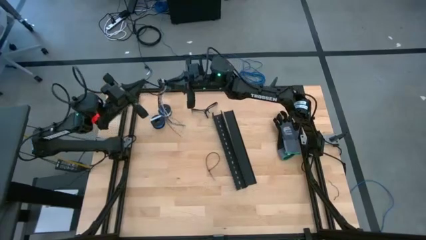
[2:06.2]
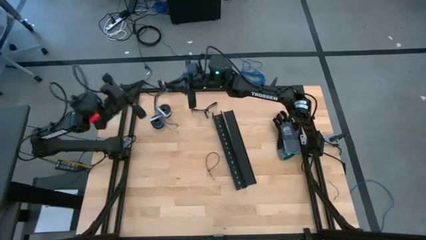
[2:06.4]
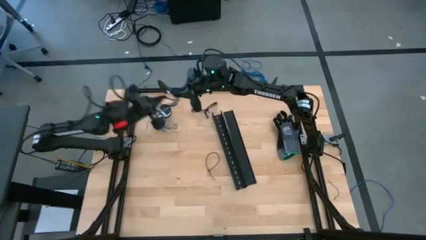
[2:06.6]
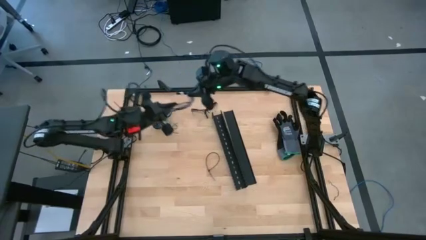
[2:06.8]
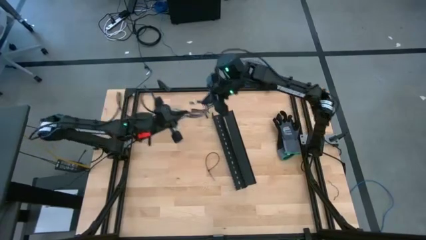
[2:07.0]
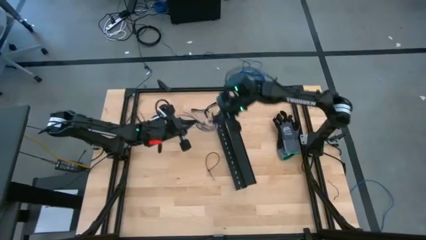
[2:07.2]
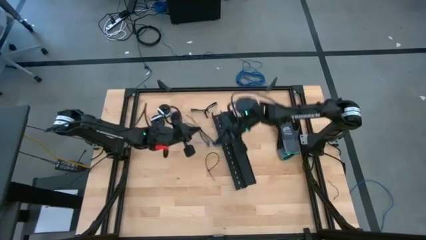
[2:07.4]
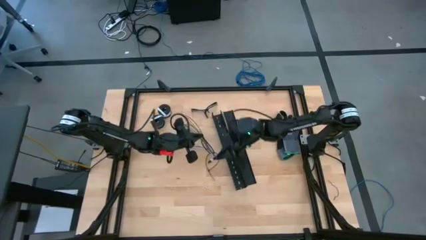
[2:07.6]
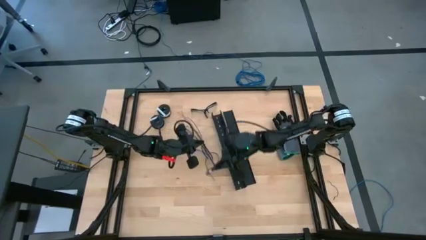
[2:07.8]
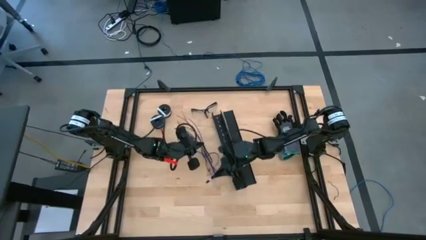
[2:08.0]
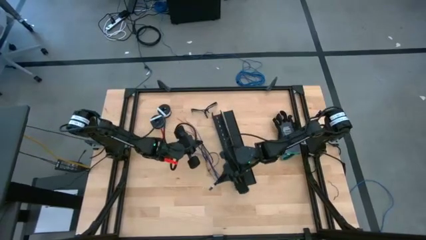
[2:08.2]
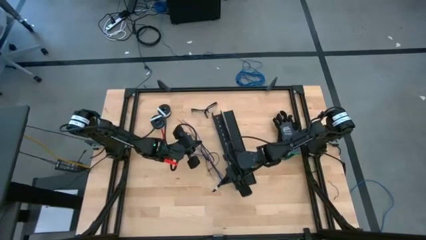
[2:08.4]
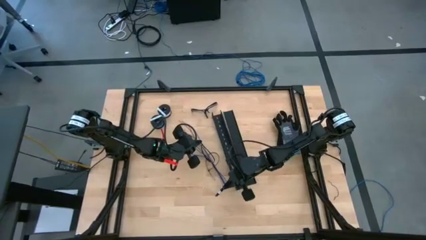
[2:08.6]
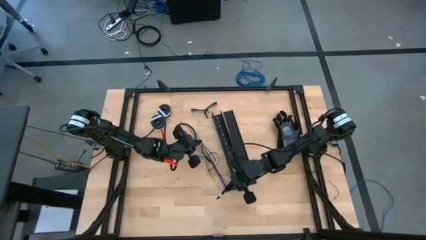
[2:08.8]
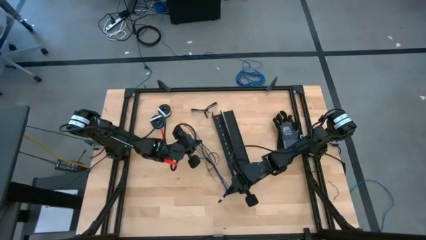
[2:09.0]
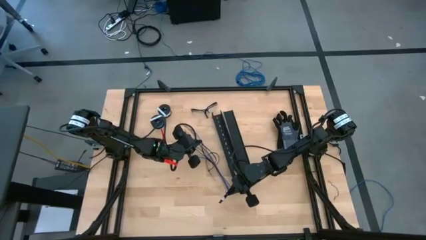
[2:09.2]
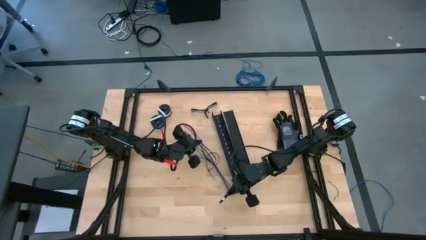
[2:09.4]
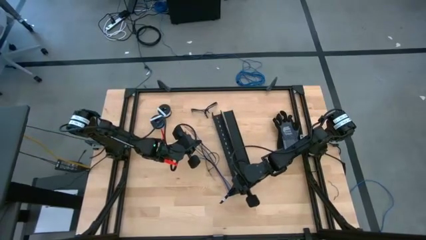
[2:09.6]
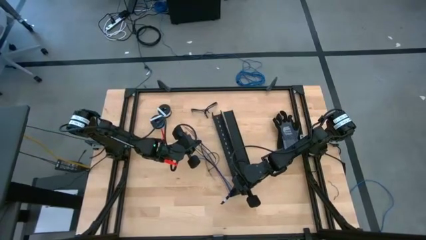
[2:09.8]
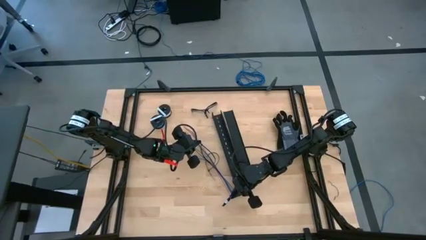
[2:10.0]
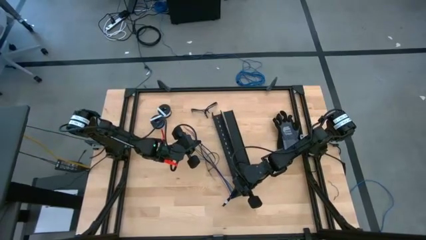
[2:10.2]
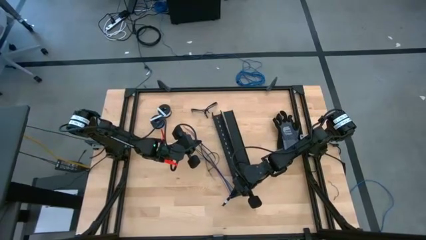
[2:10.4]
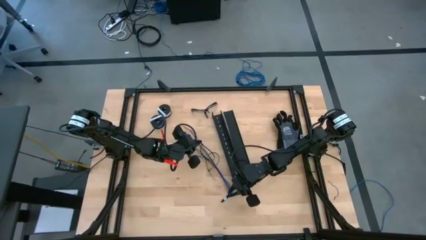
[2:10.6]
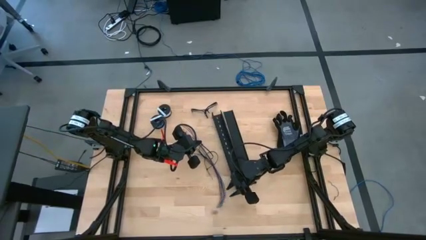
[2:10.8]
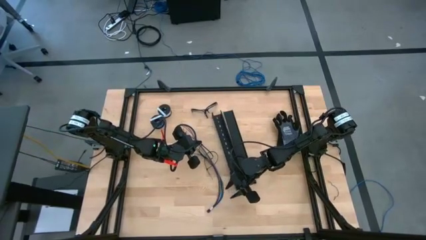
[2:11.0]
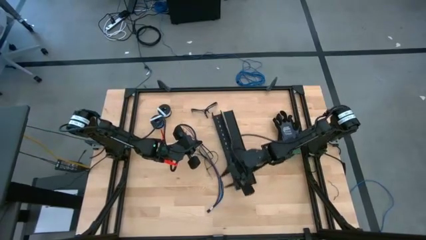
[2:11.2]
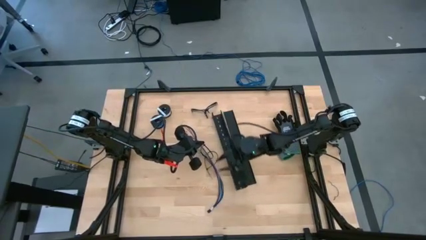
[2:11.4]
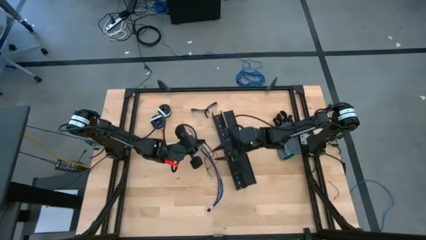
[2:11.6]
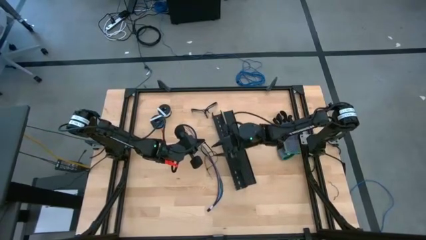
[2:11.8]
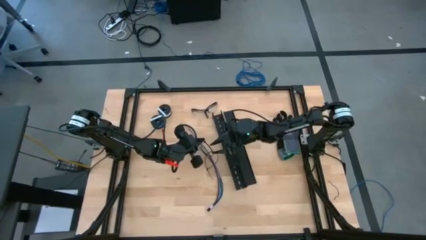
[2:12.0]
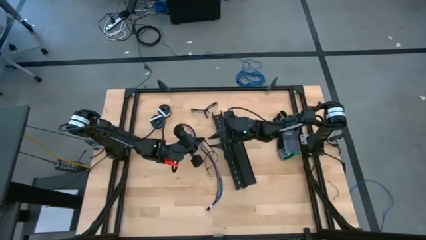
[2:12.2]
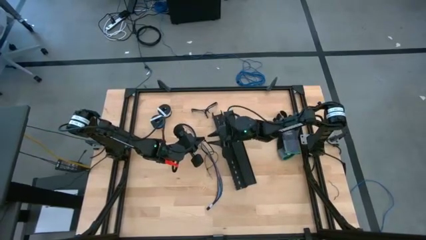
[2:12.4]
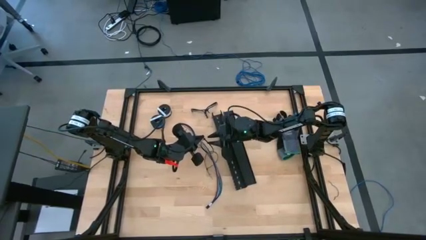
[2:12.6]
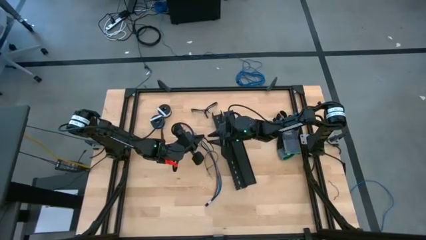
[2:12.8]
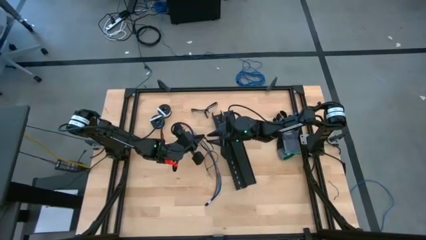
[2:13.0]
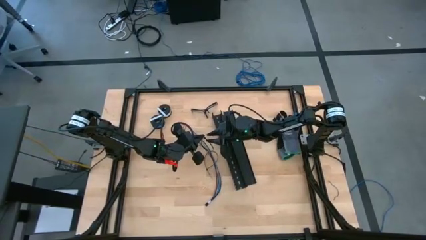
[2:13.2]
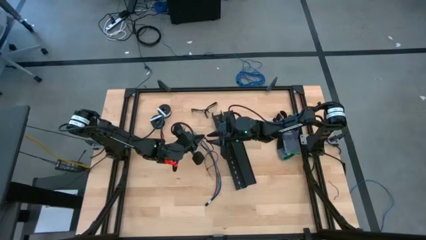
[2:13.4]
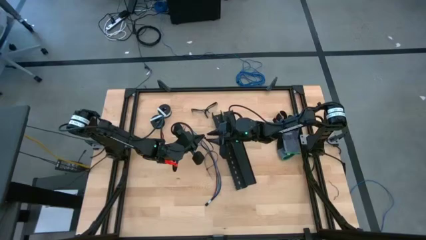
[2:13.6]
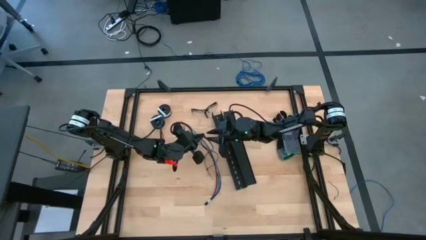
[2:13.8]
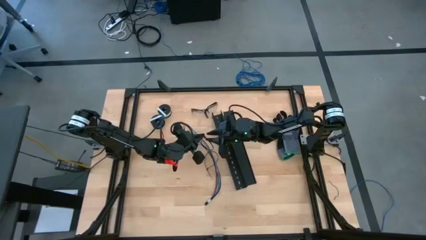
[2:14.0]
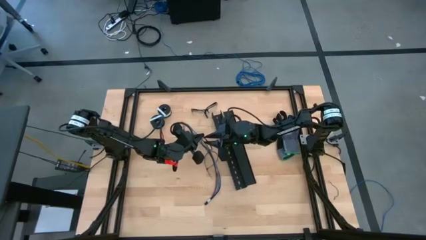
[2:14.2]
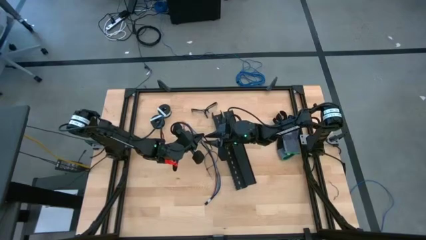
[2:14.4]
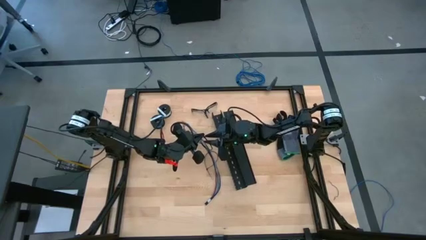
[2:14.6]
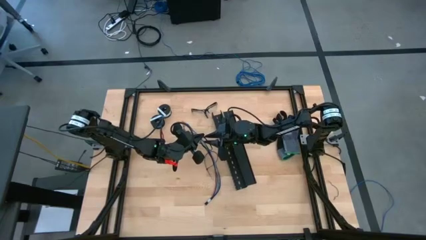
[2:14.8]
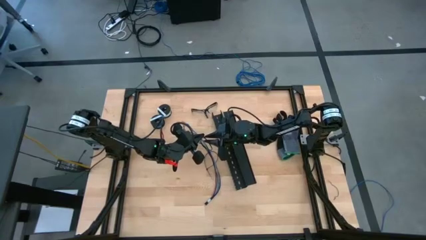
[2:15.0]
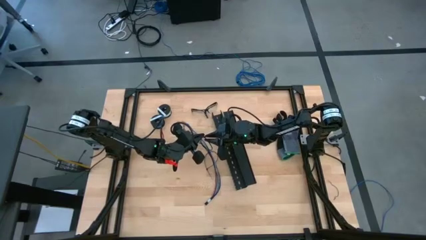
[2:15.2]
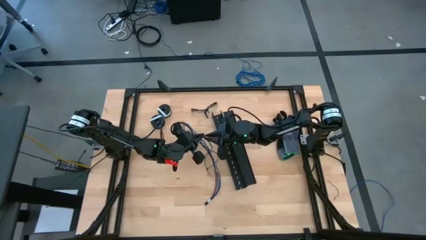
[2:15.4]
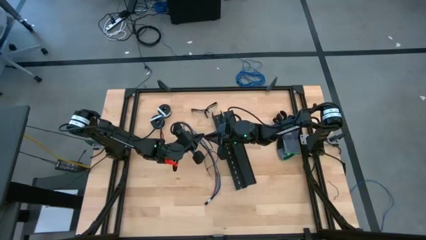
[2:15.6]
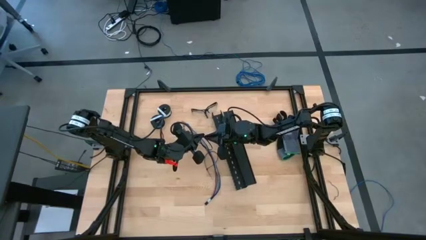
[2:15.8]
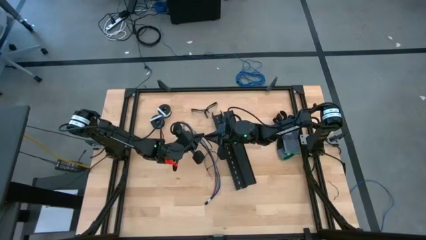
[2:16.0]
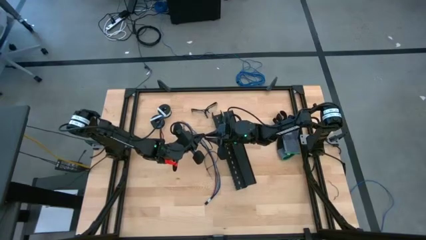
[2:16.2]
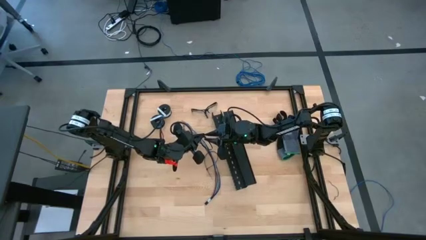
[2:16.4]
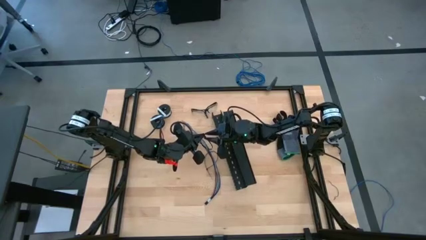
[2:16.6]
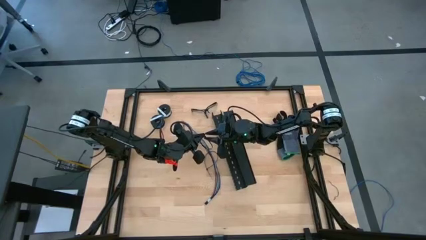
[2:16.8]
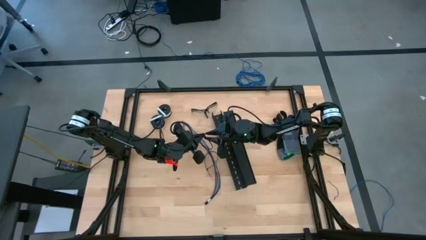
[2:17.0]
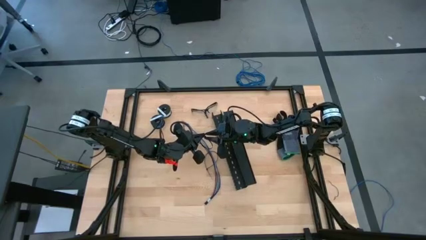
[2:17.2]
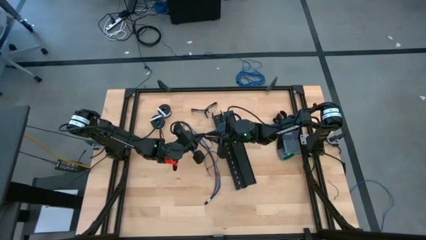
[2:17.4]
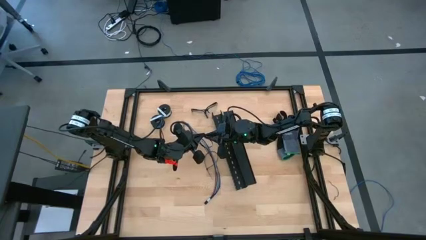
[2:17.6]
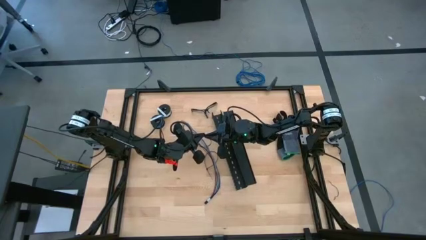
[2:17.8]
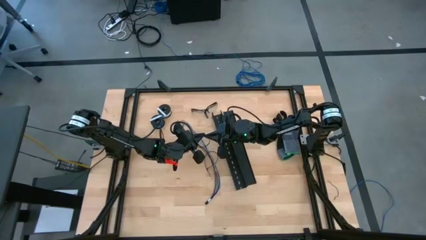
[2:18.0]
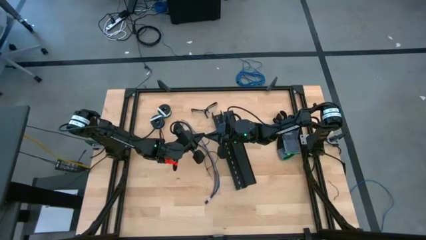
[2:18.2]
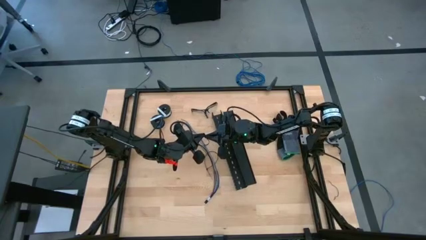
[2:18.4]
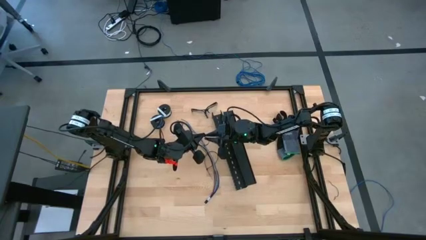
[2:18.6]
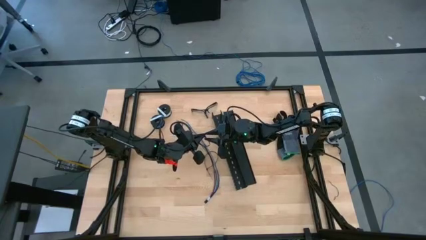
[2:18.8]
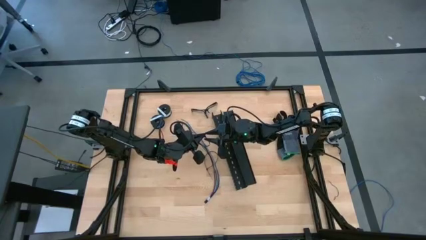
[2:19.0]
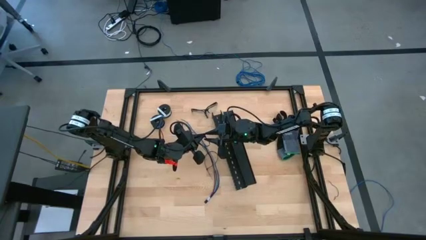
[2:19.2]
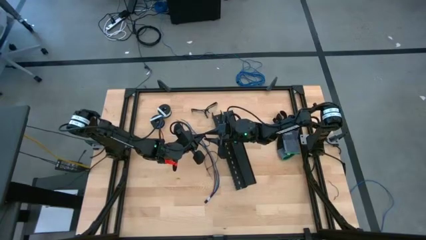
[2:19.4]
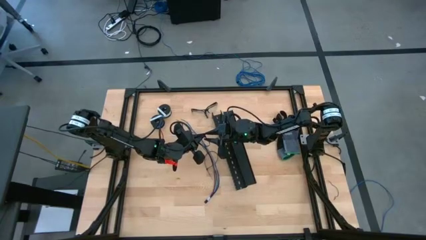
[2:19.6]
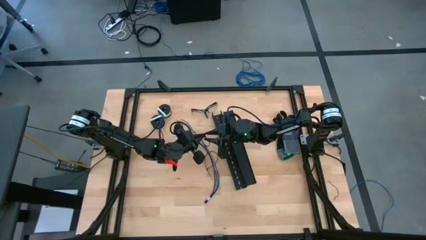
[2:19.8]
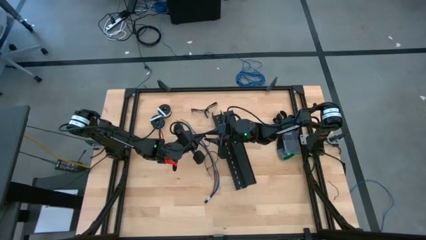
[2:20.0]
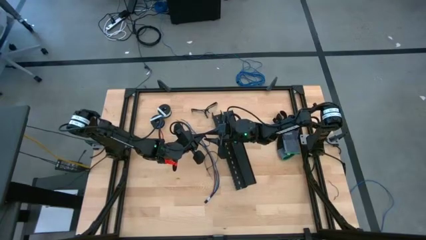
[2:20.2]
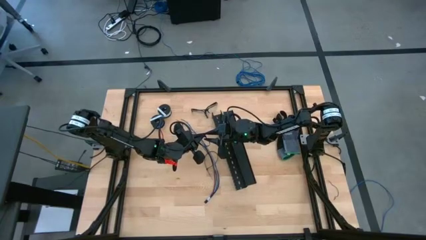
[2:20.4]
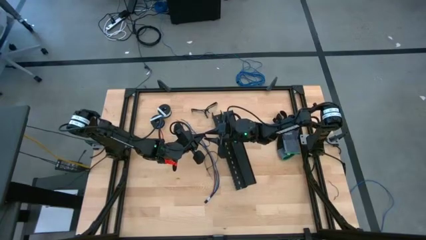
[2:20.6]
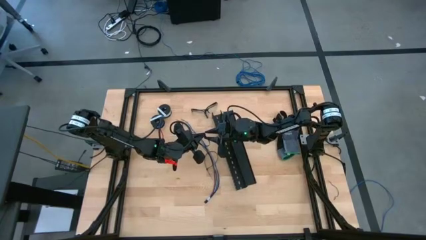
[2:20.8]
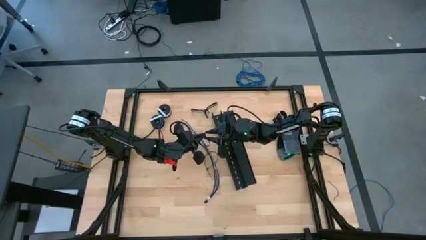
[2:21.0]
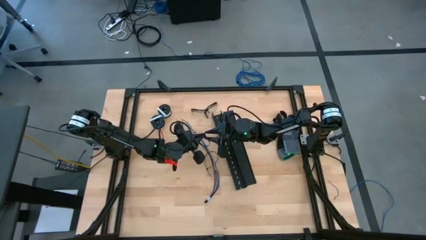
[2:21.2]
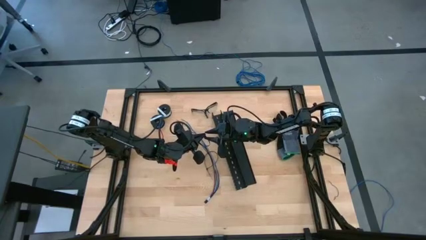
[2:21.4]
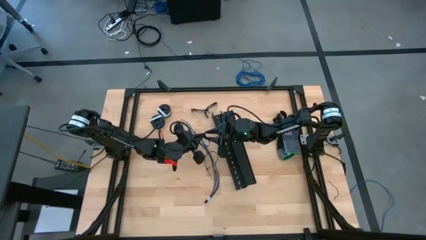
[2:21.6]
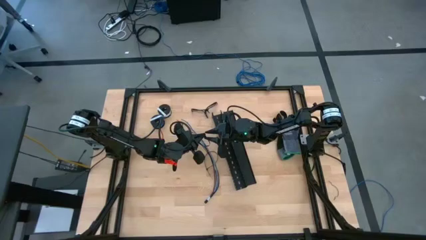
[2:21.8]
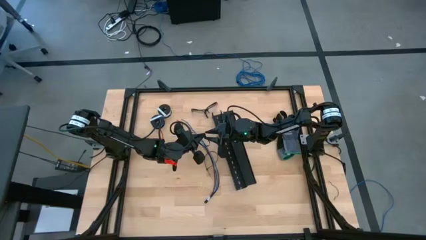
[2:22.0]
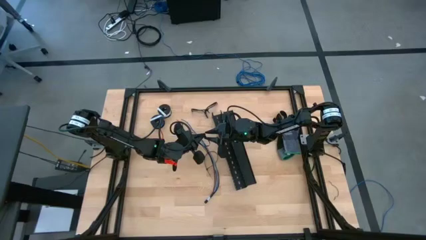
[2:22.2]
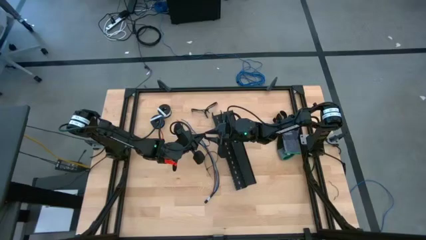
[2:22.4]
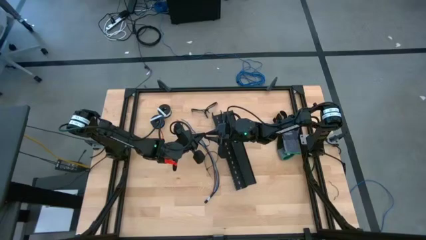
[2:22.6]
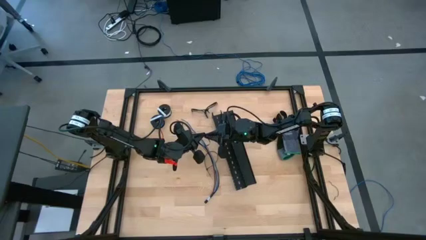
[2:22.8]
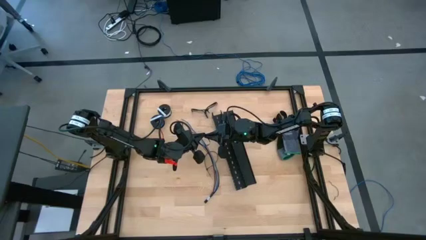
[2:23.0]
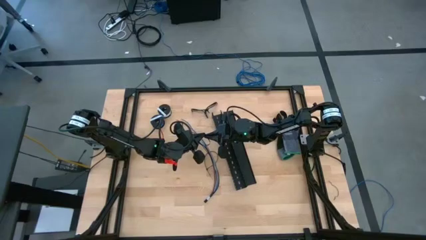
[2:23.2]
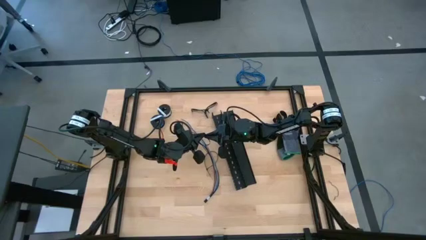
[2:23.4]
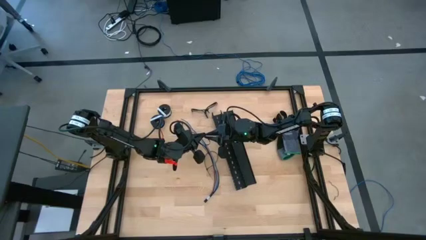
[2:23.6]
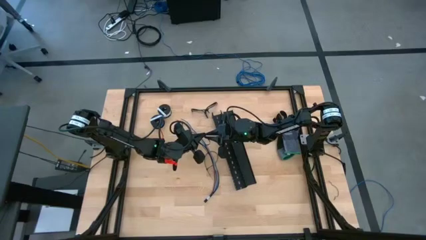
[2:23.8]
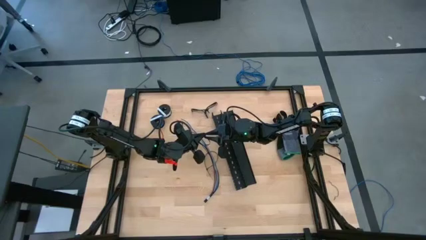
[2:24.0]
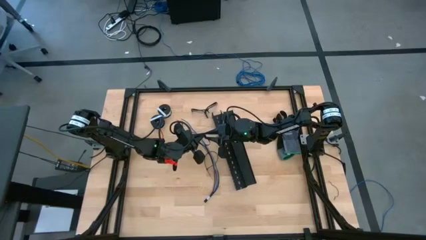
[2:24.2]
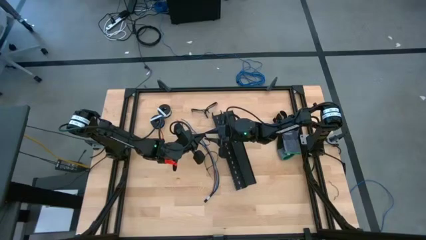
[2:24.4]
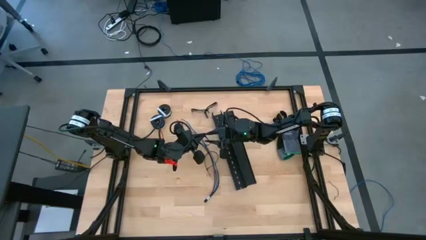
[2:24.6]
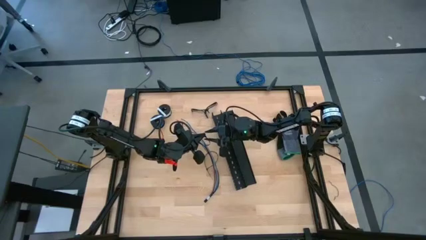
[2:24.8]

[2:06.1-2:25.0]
Task: Ziptie cables
Wrap the black zip tie on the cable
